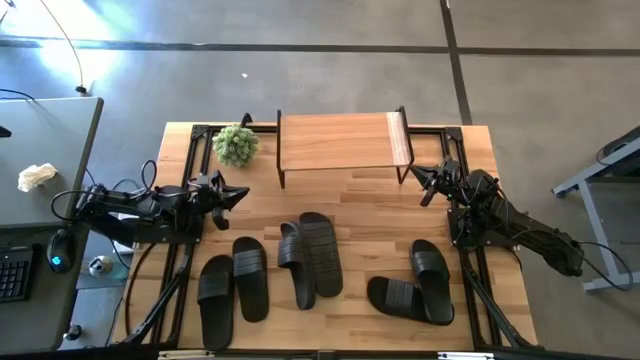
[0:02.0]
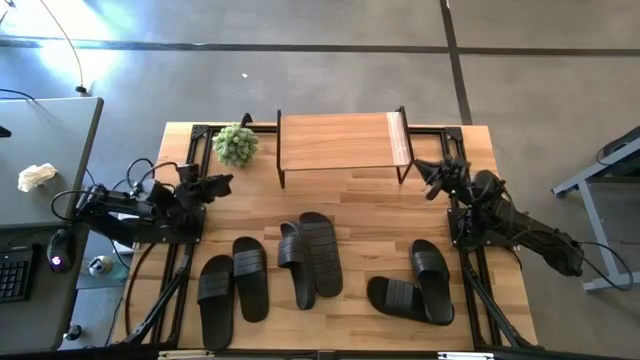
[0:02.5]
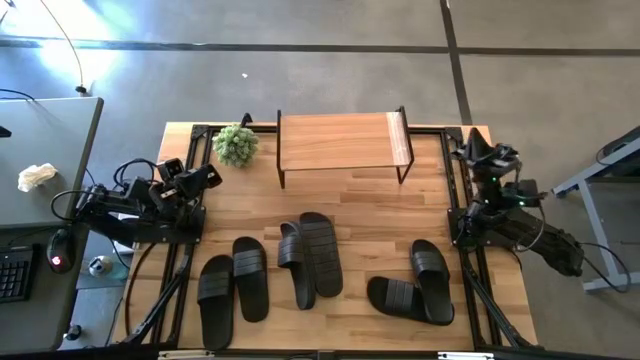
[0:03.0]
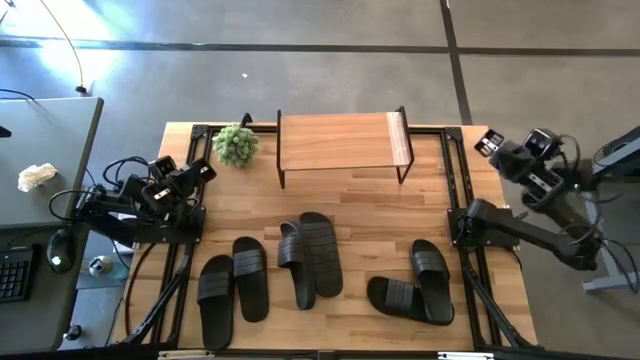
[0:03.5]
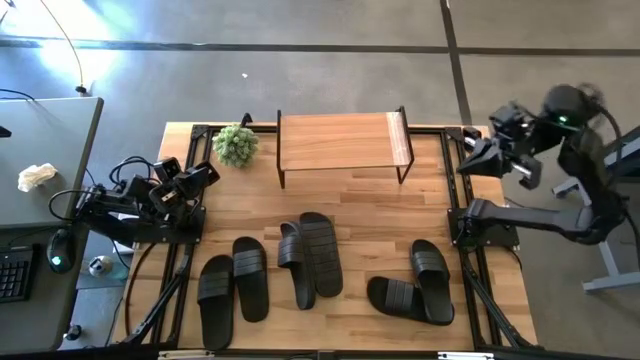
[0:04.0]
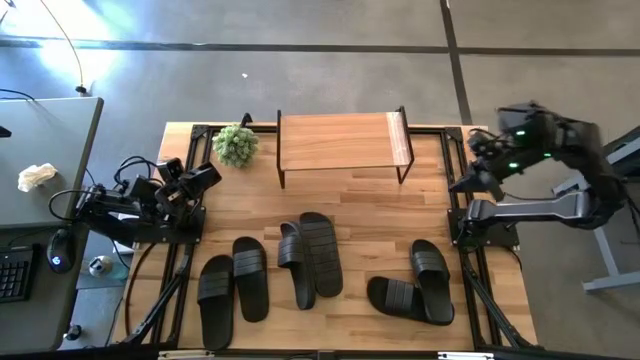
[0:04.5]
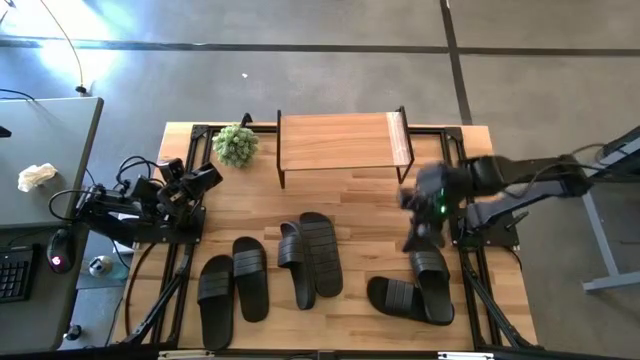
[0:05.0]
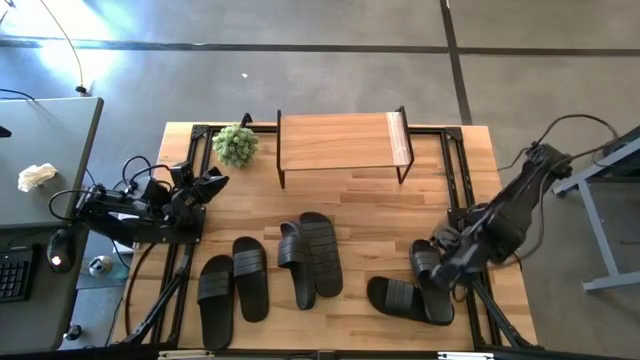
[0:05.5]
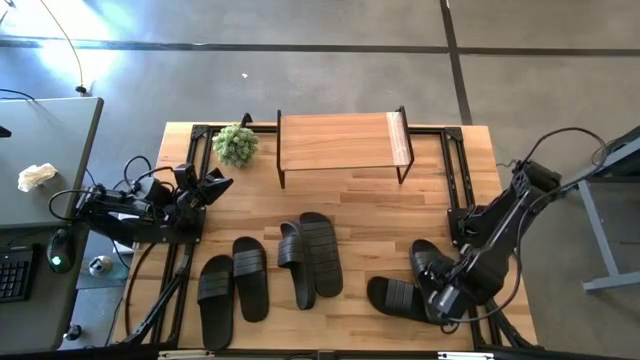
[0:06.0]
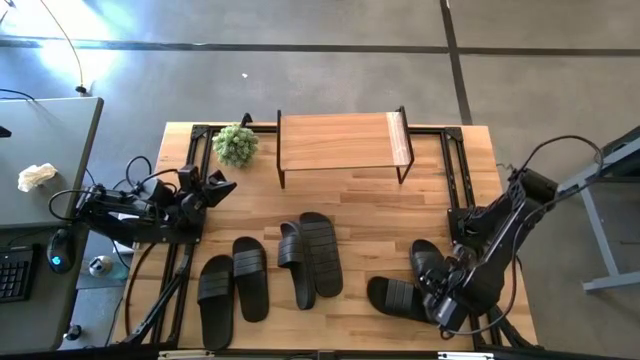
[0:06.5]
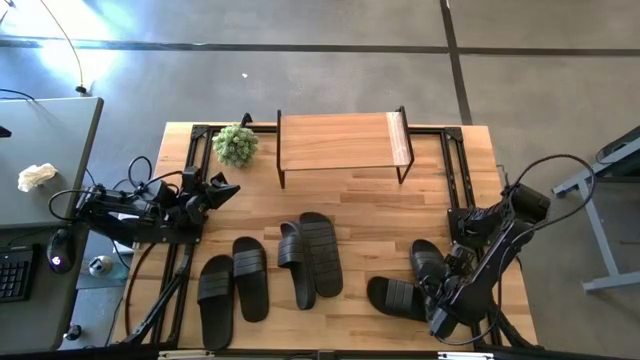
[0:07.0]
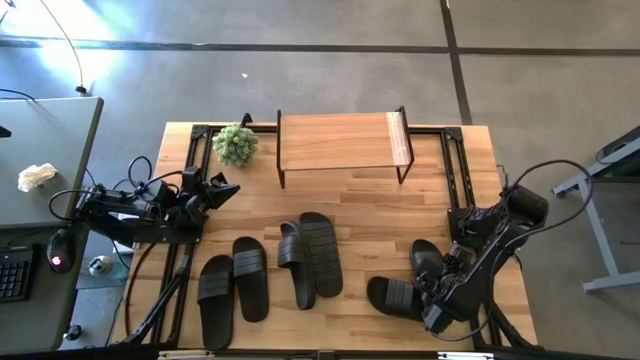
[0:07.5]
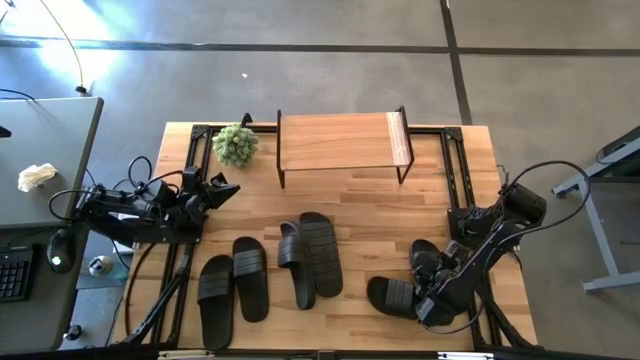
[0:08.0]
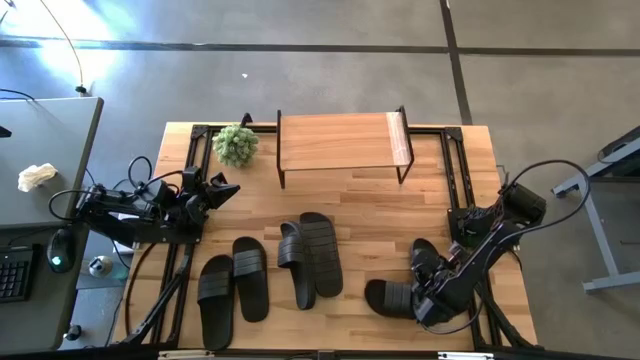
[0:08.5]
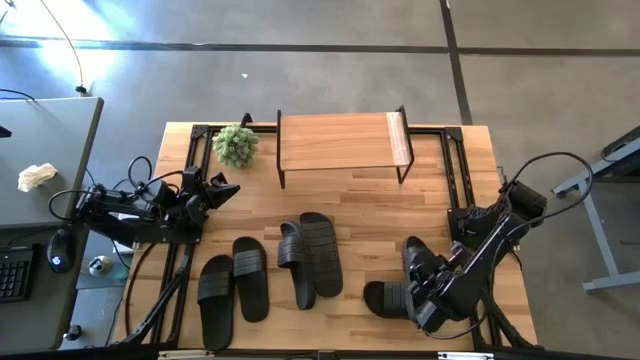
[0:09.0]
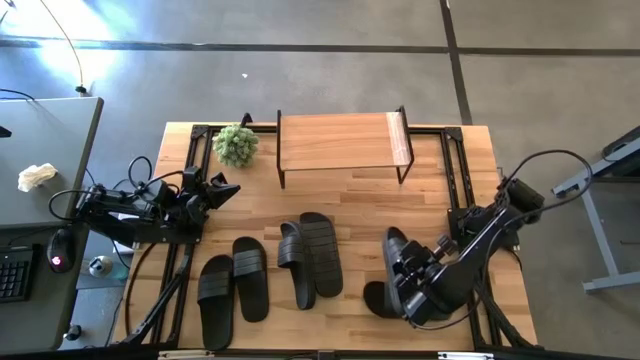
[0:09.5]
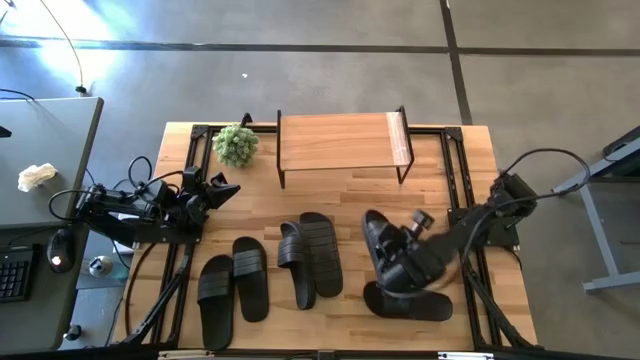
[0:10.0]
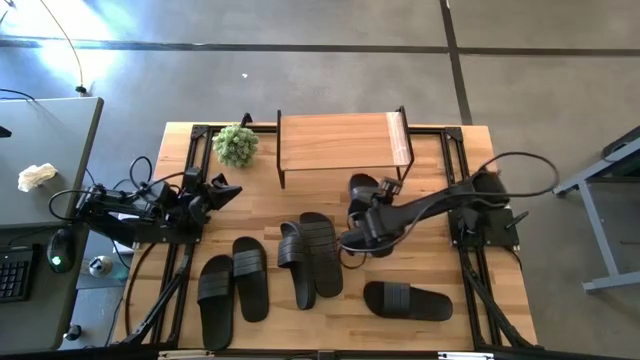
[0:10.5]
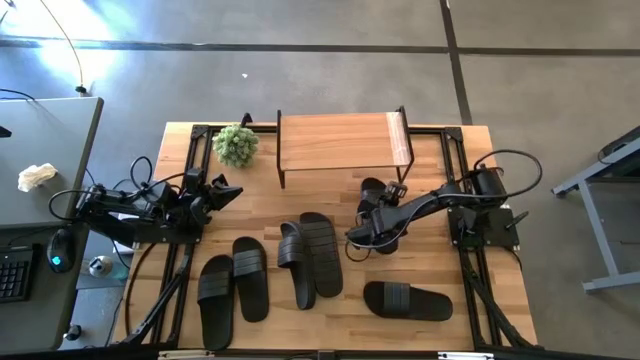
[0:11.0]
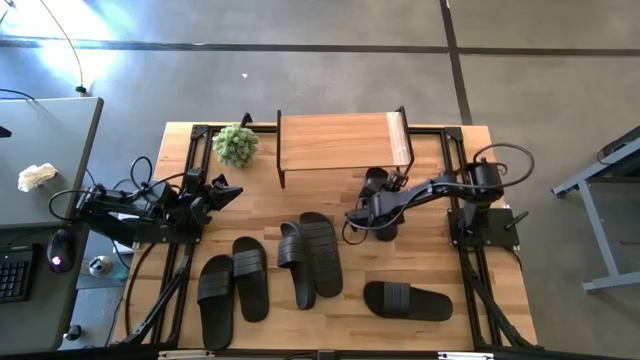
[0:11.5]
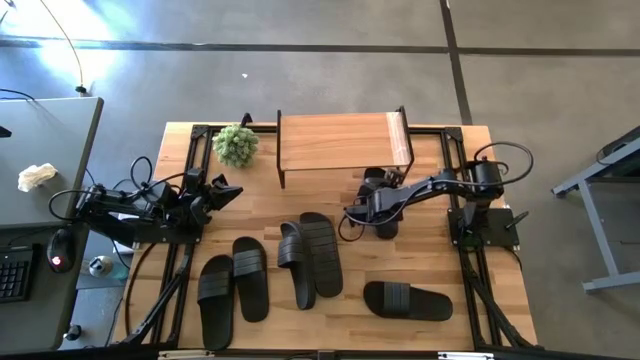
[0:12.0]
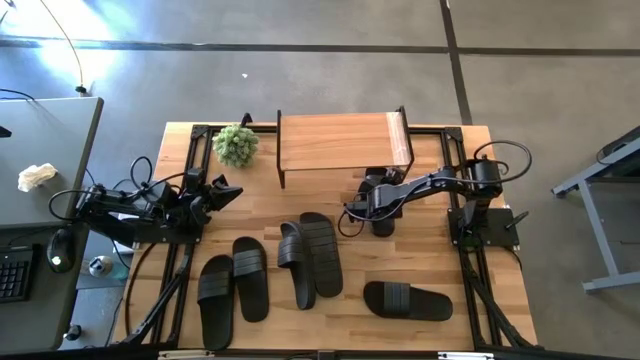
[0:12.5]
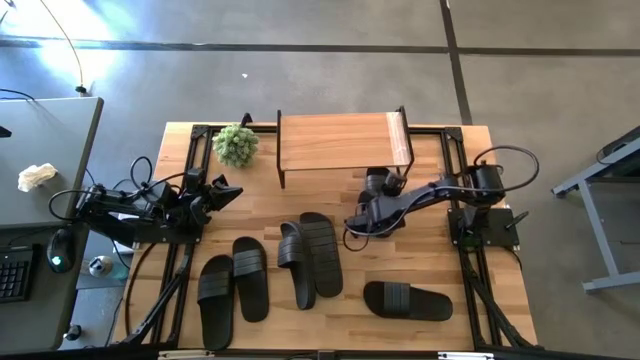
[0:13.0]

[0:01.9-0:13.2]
Task: Pick and place slides into the shelf
Put the black slipper under the shelf

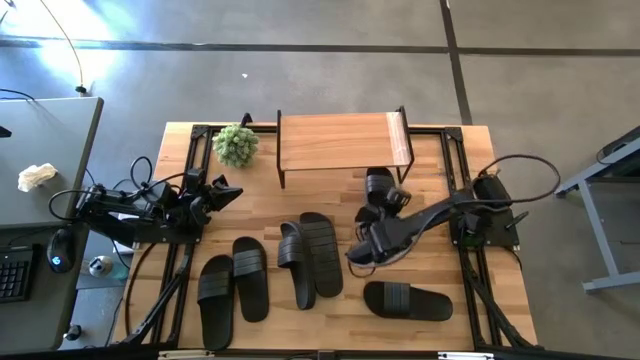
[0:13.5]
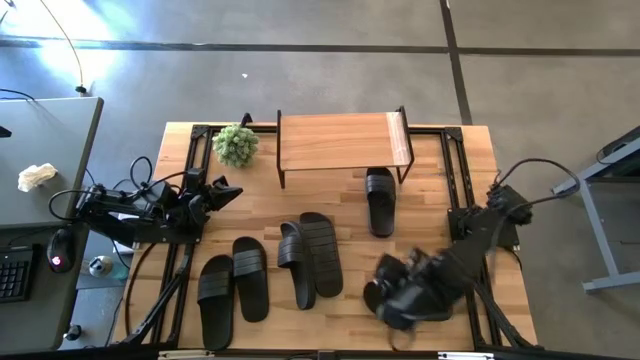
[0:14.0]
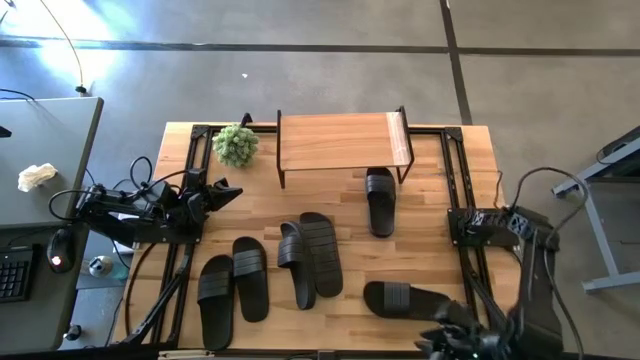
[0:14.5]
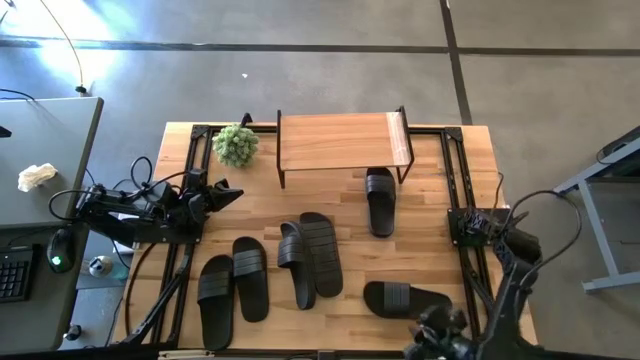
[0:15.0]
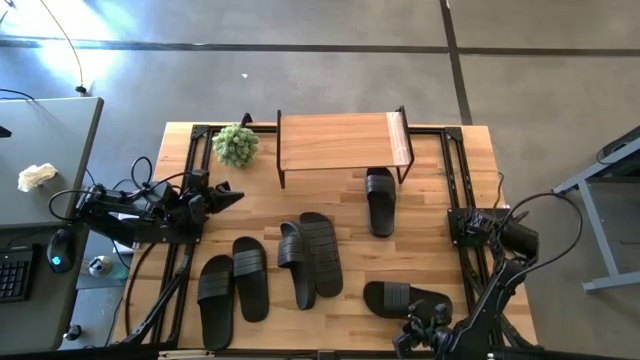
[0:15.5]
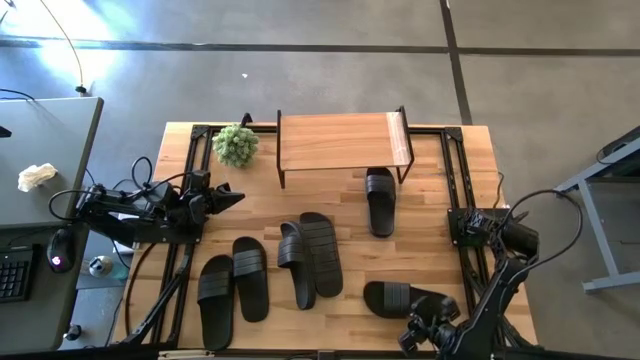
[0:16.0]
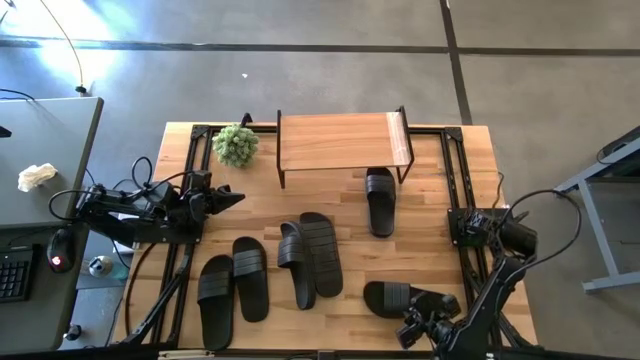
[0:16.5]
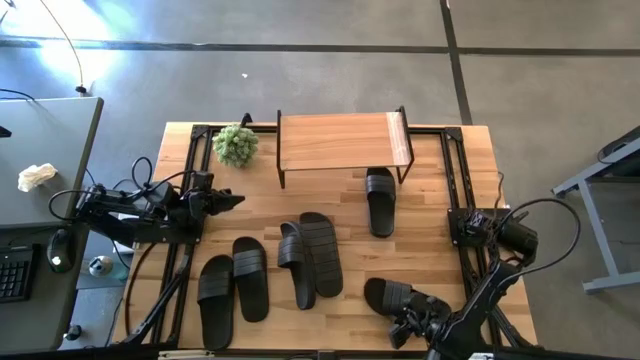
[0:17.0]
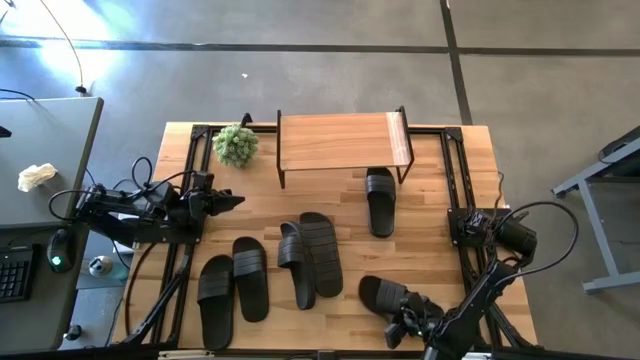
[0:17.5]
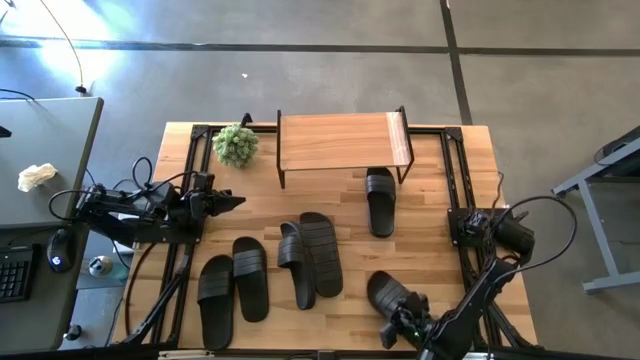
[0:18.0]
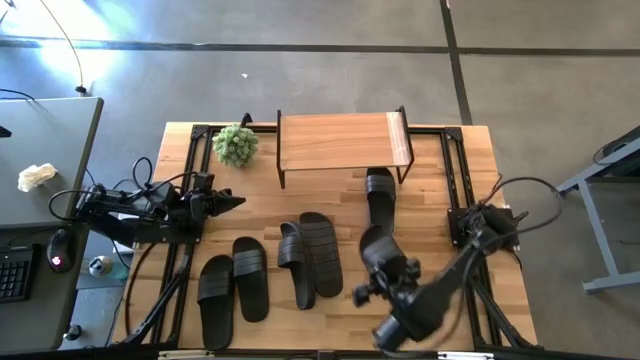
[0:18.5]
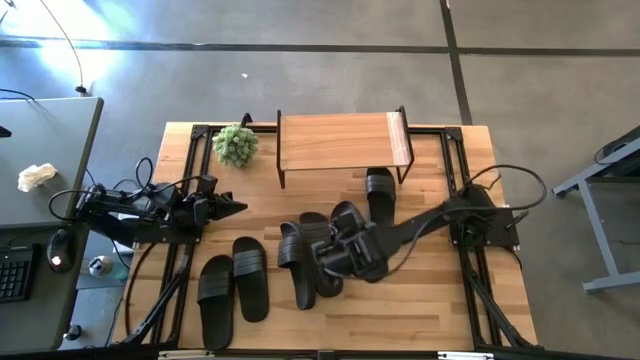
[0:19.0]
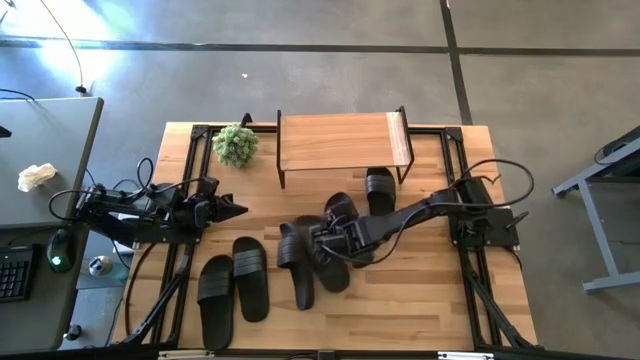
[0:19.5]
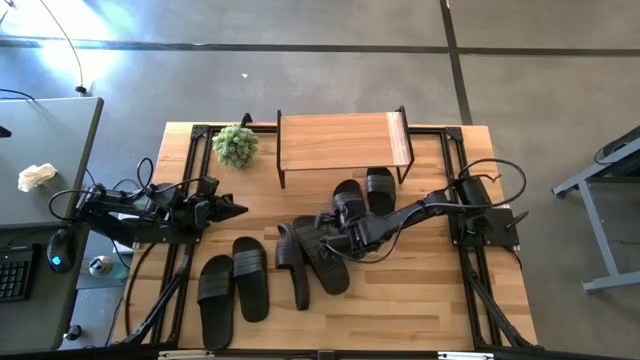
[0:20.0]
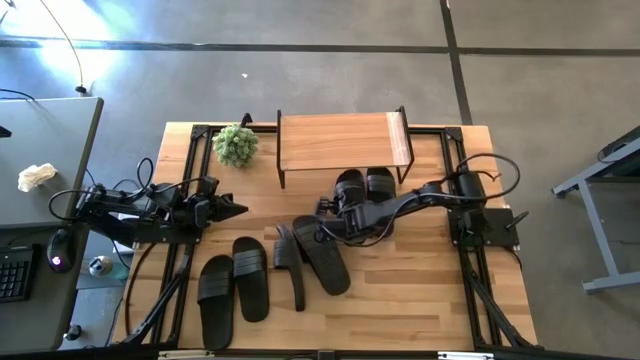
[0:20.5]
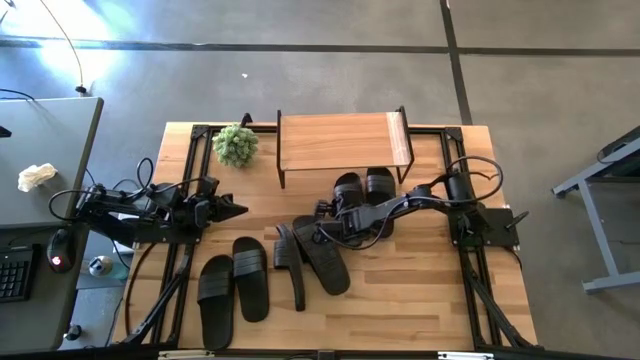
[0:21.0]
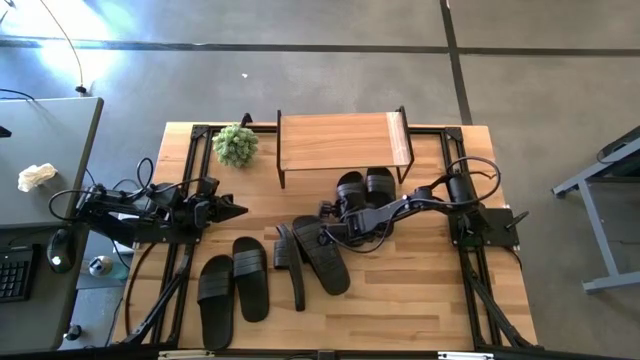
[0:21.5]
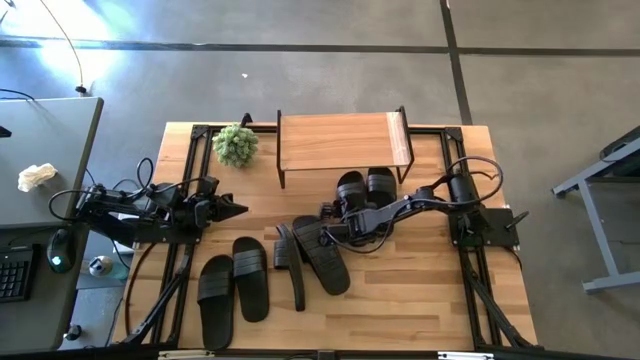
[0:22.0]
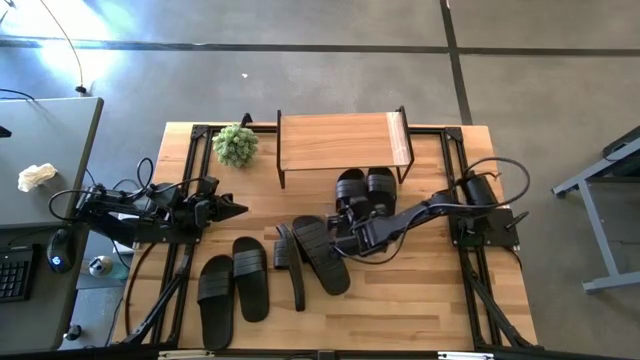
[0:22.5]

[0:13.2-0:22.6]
Put the black slipper under the shelf
